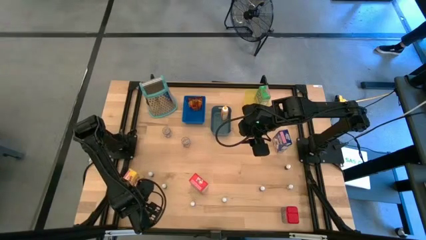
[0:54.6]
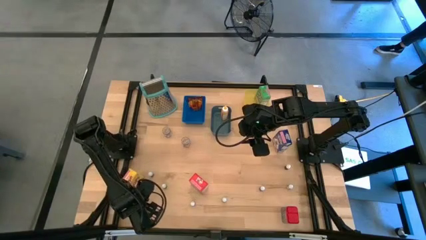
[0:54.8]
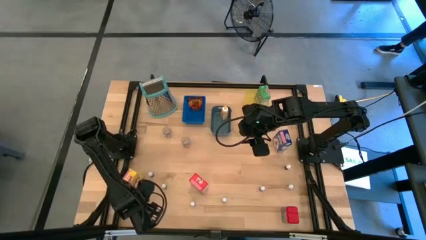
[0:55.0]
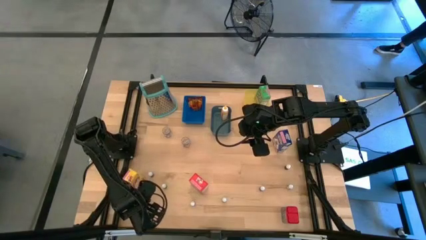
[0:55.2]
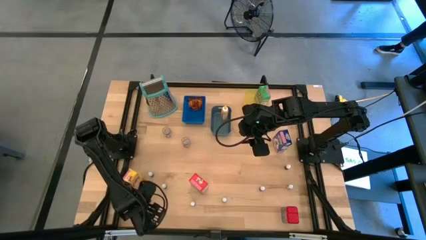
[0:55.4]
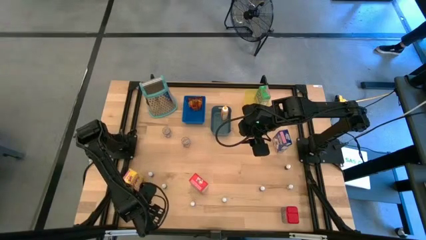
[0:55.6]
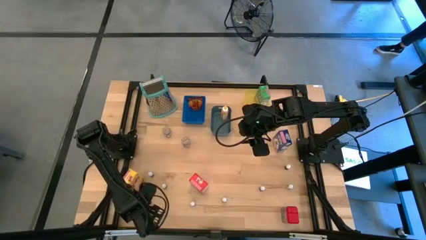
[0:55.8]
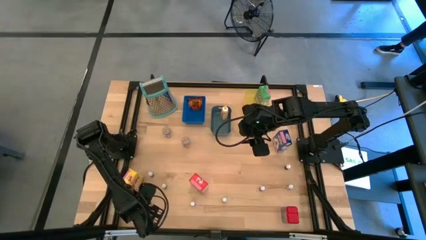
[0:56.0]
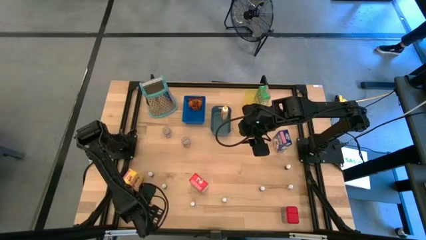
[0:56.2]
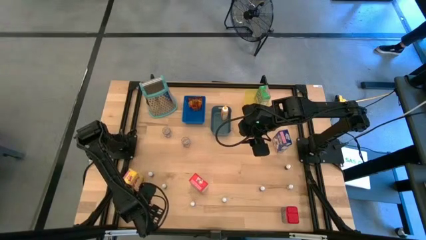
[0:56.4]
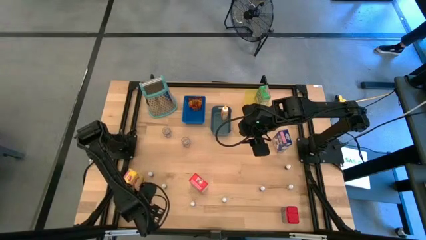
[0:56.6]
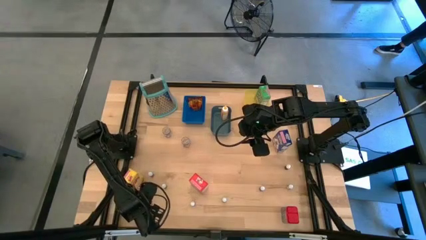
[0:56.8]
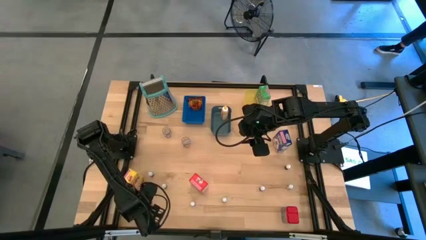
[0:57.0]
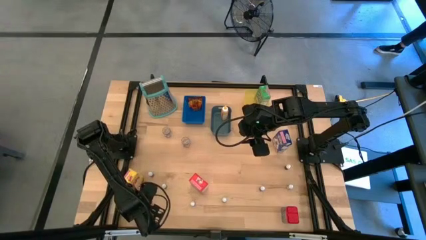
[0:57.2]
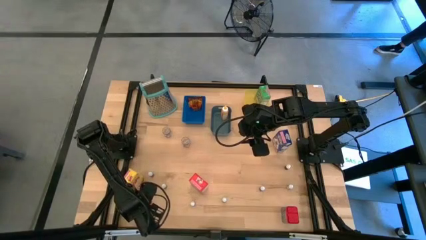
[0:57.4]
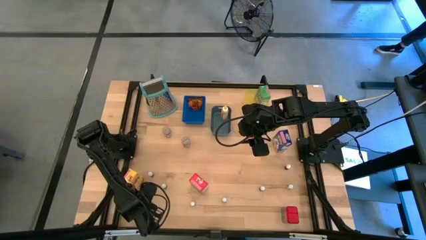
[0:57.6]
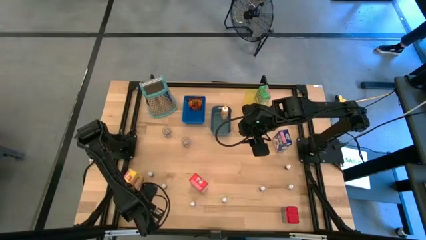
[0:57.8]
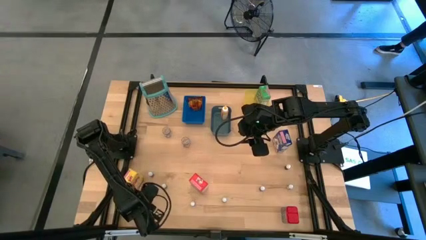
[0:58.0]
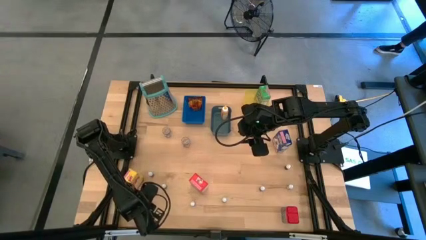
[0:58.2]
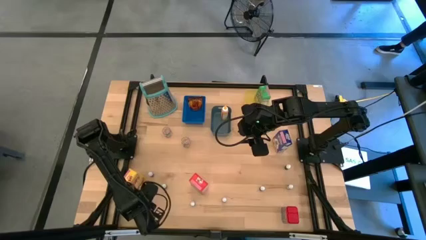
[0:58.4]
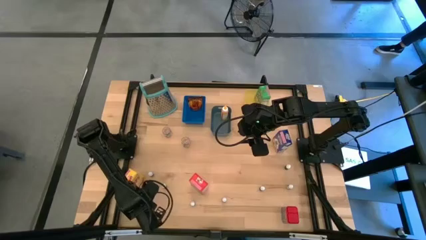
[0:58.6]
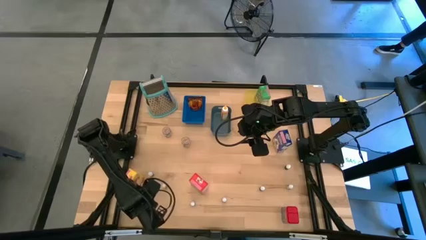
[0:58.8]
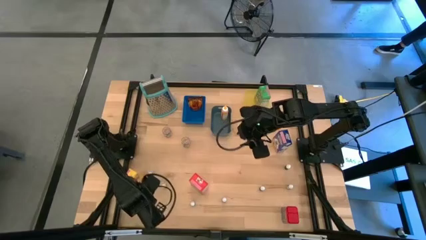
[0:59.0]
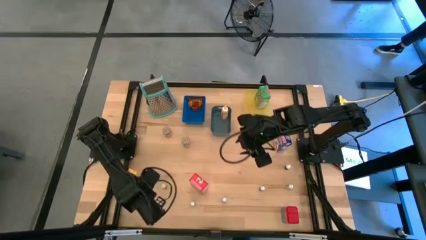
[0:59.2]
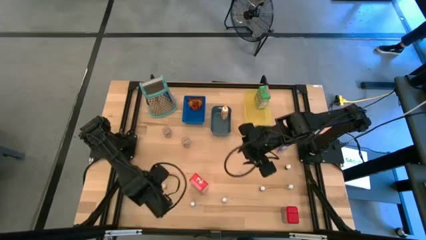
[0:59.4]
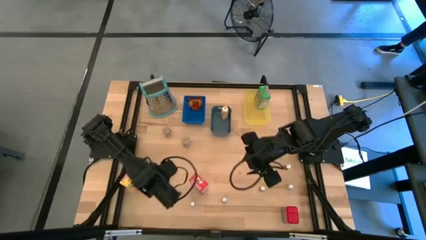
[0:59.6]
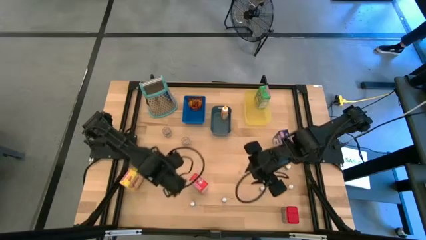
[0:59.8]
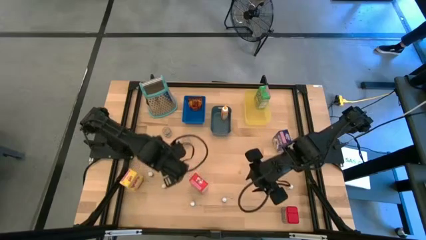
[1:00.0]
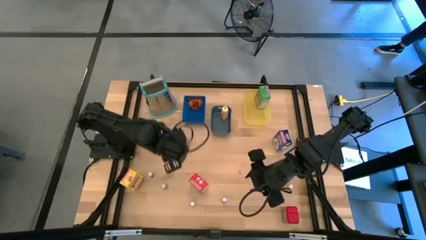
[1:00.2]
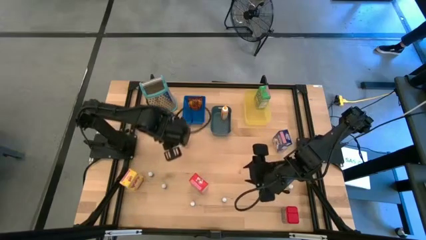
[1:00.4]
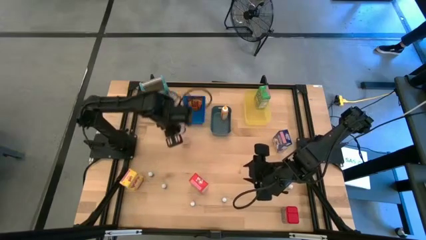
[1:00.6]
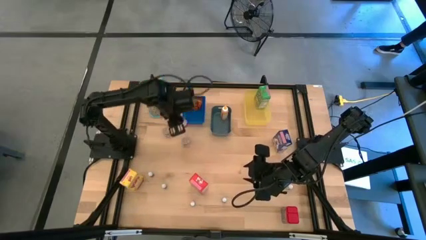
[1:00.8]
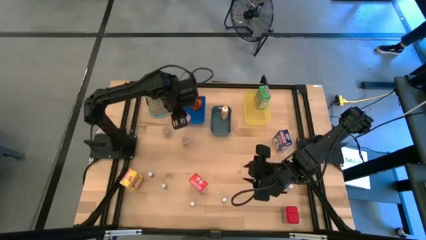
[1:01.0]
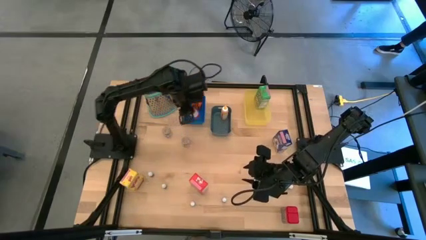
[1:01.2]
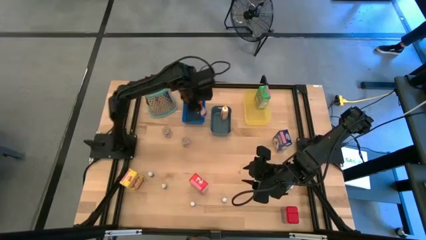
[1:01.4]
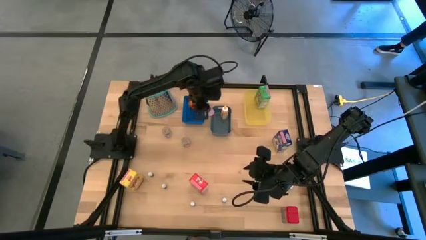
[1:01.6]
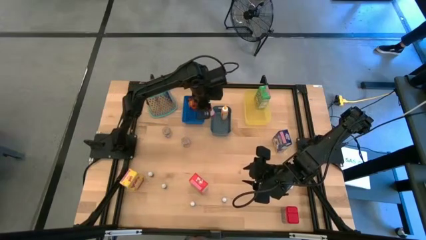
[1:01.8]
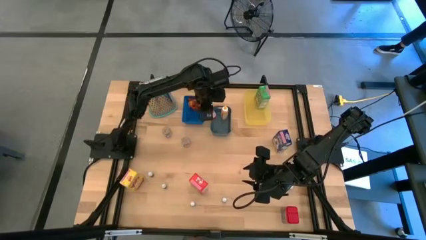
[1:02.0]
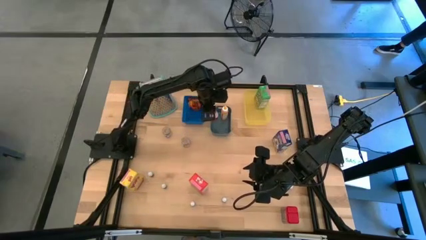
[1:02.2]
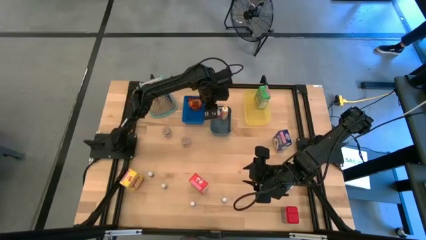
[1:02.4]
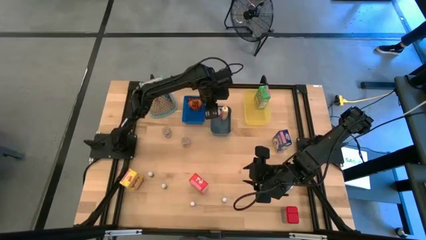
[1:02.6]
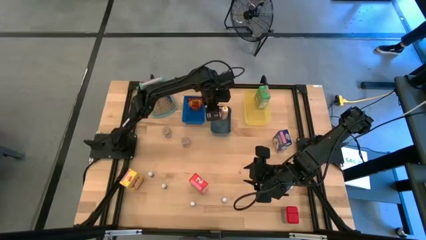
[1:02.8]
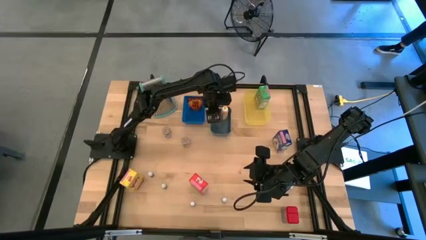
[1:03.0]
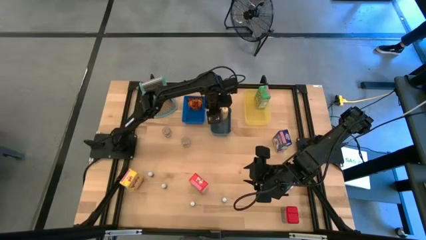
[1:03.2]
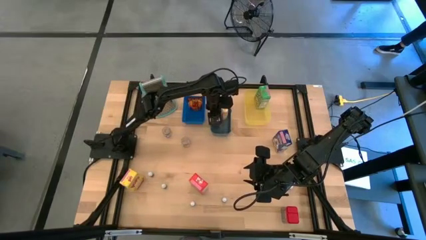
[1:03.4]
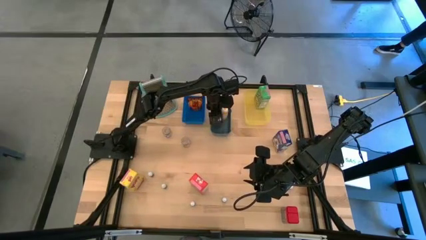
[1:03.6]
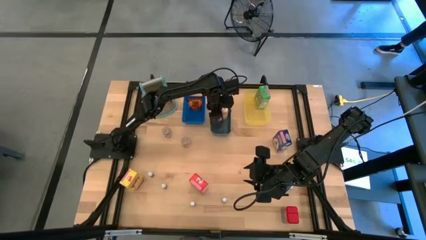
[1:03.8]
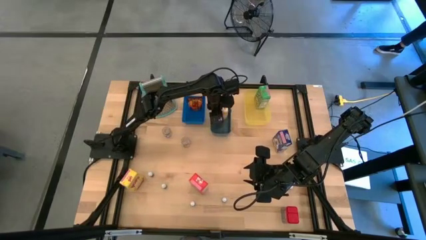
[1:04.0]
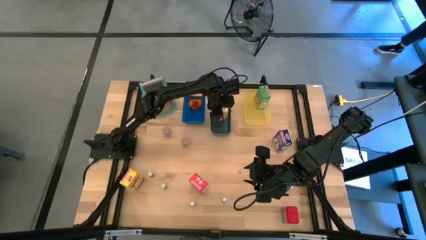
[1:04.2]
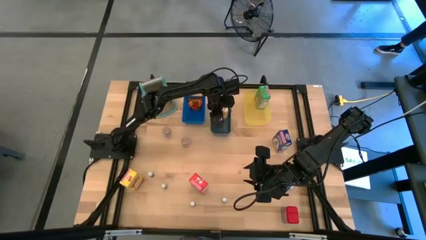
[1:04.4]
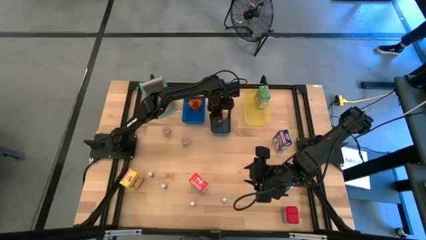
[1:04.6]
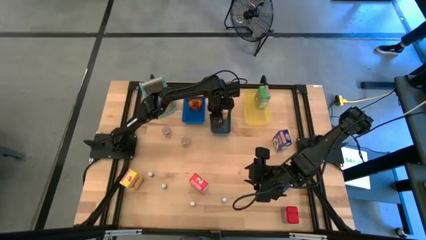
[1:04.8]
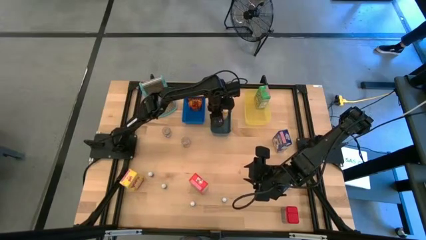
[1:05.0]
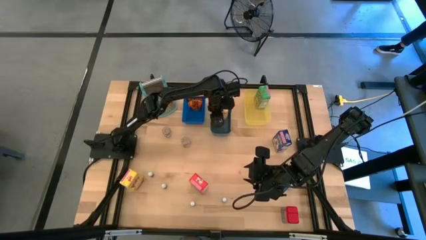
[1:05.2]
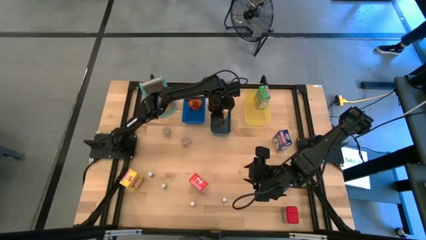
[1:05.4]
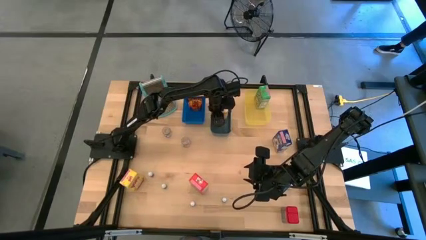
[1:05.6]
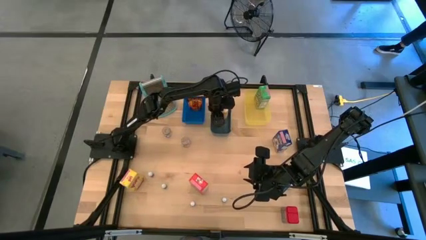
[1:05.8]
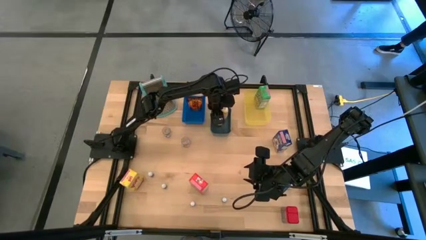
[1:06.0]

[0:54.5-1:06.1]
Task: Pick & Place Kitchen Items
Put the big red food coloring bottle into the dark green bin

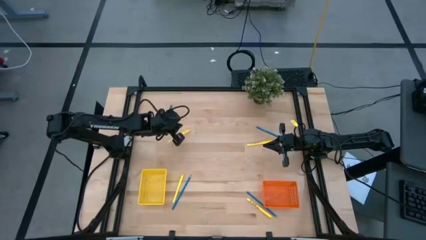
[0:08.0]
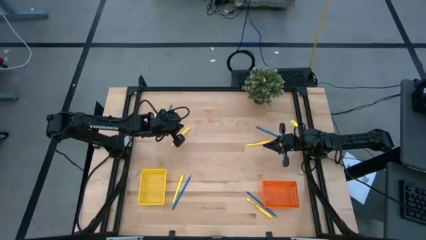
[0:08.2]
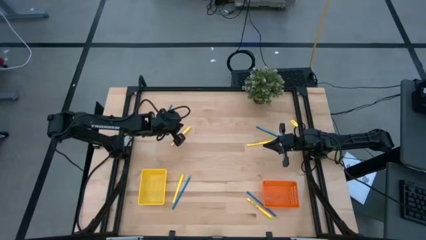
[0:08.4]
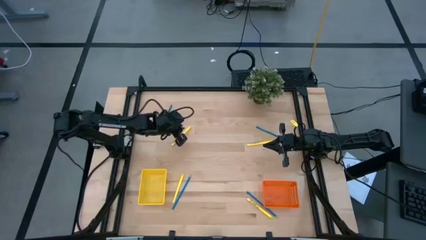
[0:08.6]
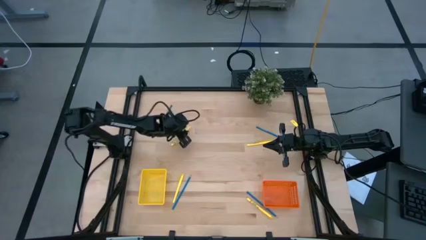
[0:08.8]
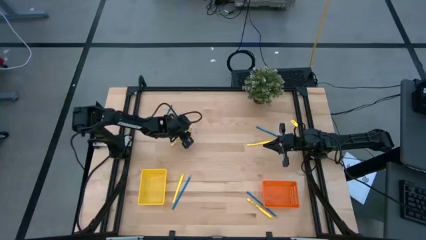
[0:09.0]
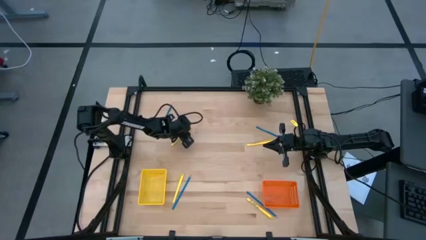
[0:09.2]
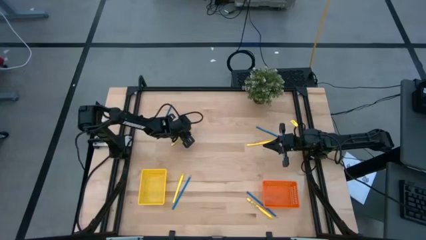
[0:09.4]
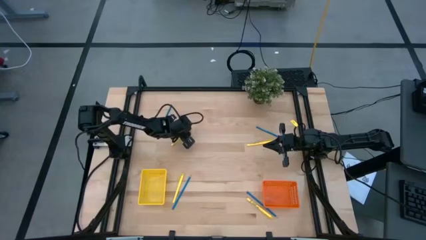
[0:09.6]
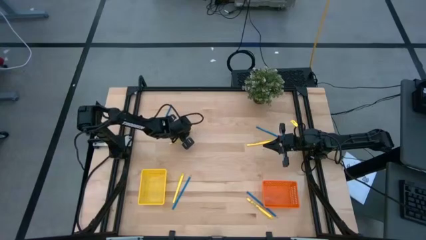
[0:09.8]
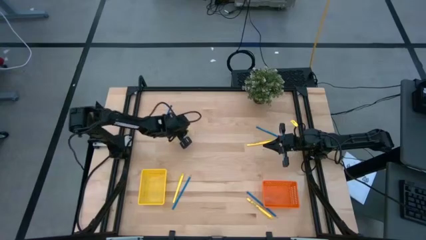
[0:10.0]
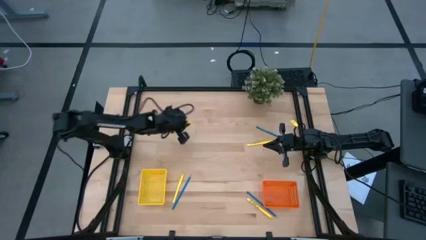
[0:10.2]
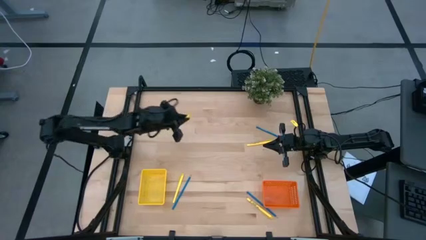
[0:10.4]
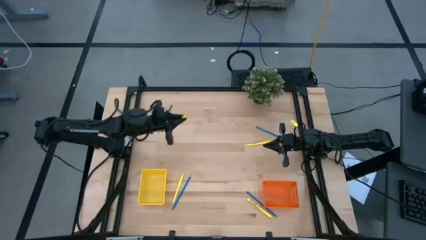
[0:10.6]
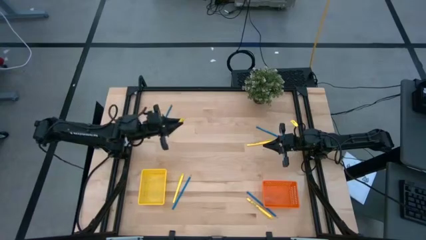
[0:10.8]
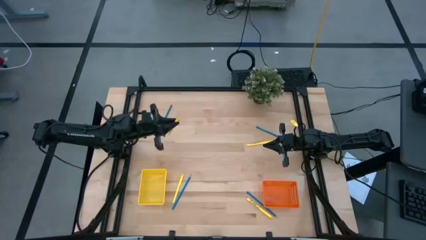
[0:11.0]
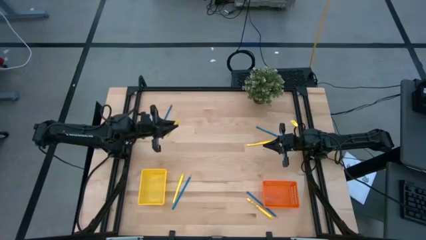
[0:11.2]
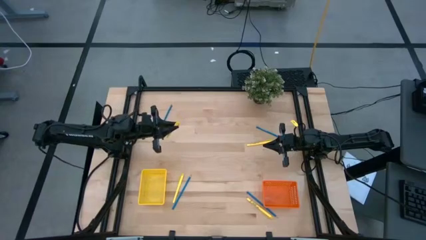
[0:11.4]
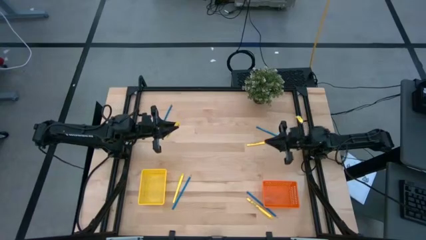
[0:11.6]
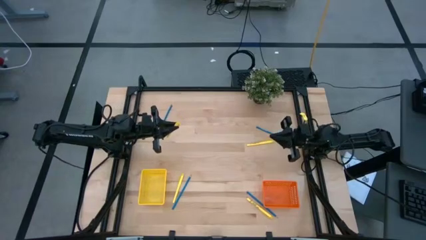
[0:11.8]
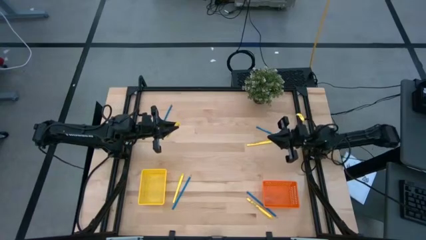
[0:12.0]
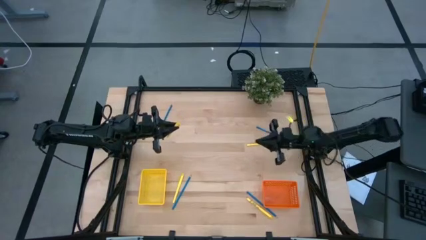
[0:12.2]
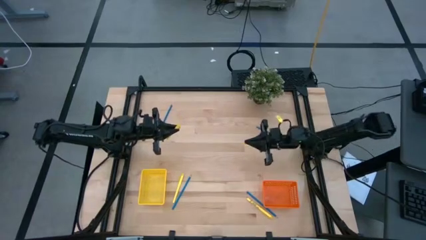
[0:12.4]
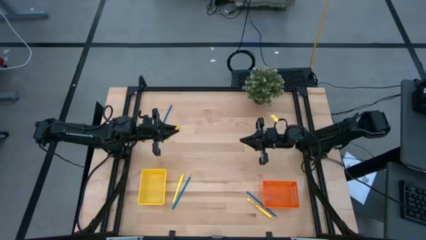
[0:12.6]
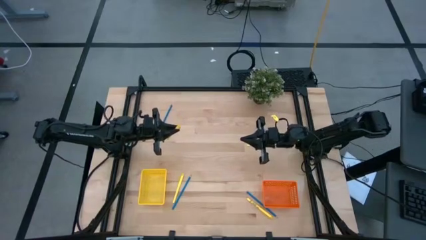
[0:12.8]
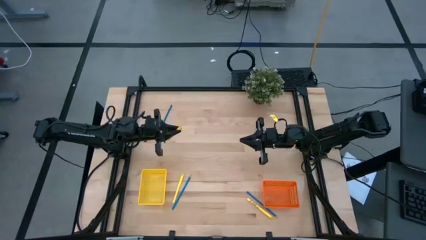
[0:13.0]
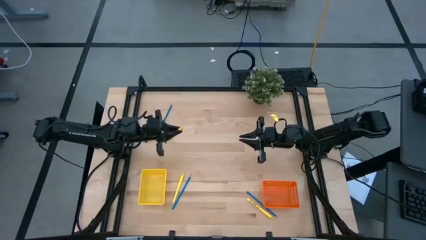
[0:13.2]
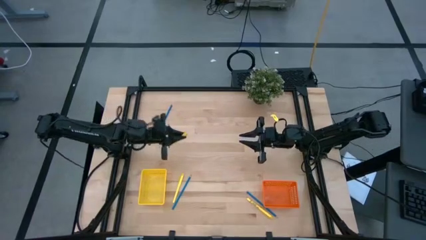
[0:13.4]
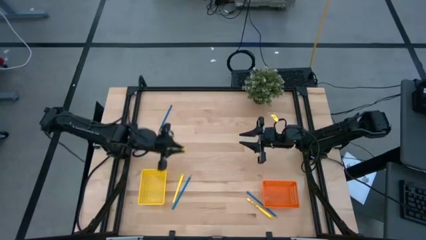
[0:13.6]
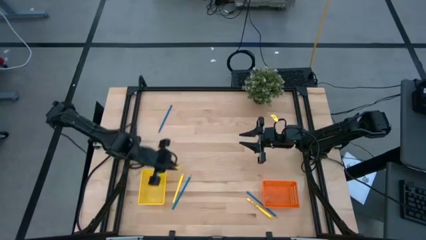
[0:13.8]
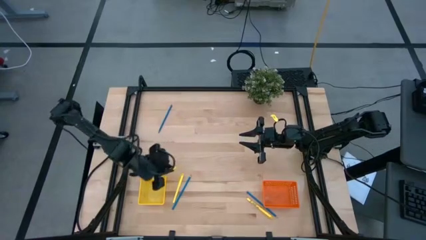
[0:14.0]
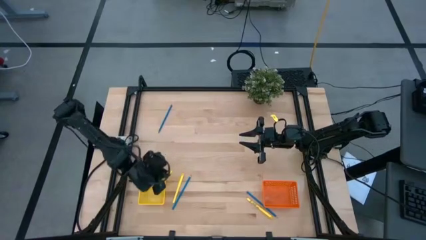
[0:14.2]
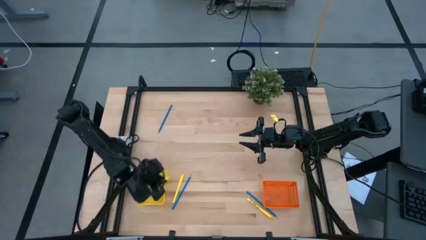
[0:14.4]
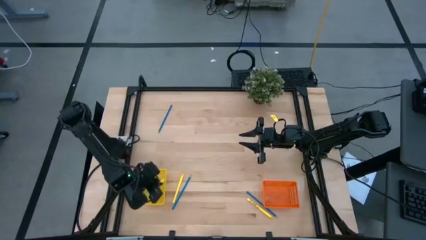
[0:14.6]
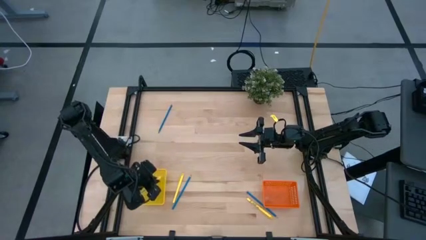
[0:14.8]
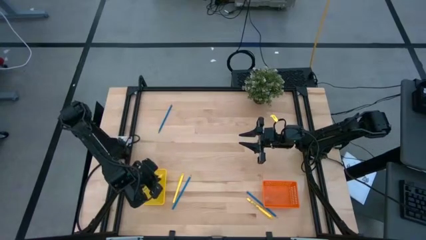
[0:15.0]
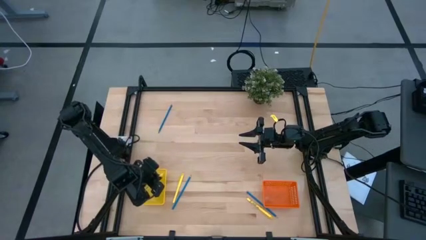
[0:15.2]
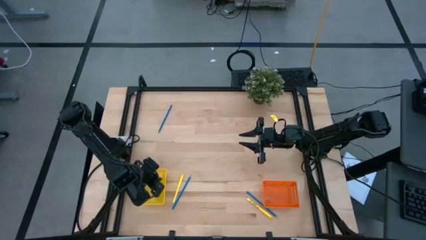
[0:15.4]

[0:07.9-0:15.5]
Task: Sort pens & pencils
Put the top left yellow pen into the yellow bin
